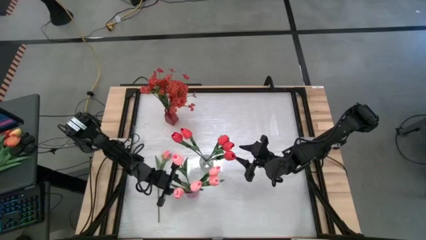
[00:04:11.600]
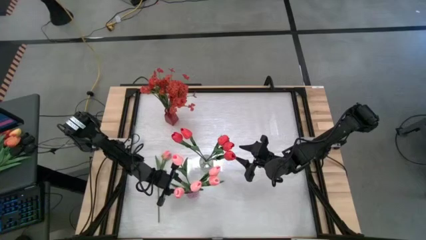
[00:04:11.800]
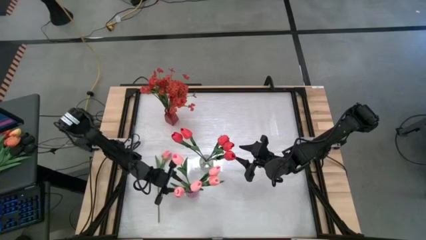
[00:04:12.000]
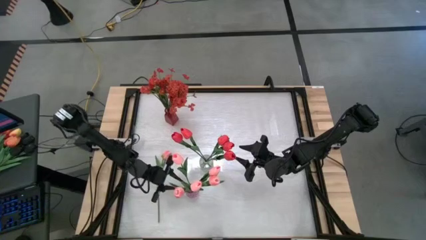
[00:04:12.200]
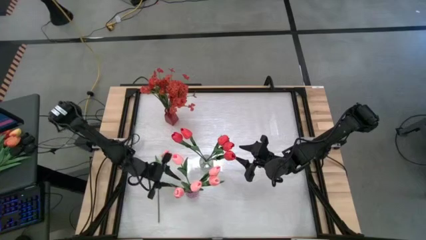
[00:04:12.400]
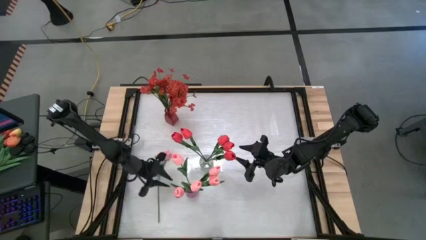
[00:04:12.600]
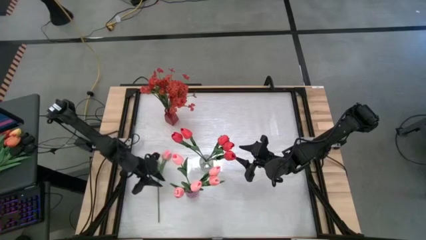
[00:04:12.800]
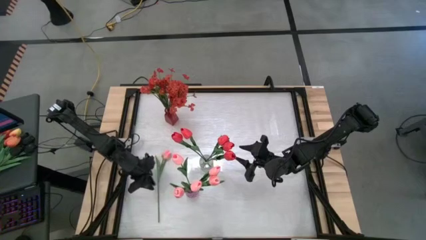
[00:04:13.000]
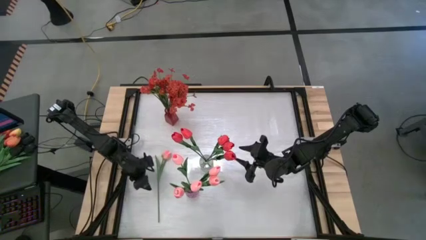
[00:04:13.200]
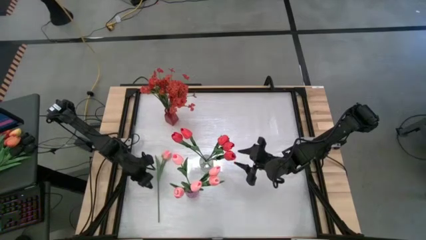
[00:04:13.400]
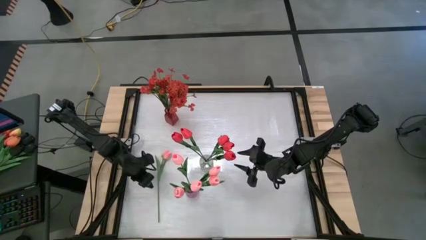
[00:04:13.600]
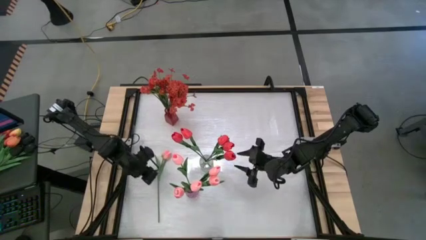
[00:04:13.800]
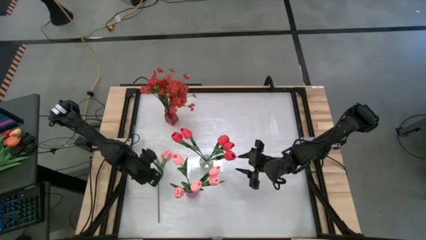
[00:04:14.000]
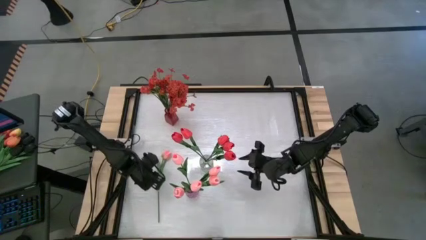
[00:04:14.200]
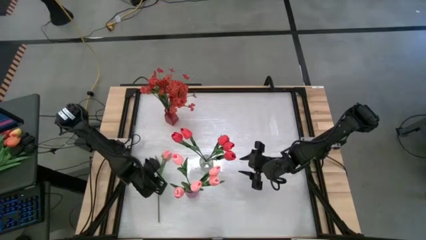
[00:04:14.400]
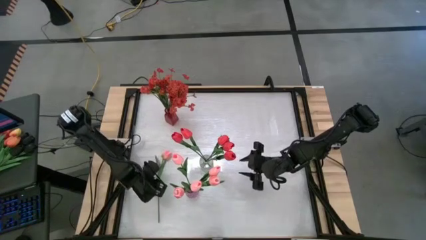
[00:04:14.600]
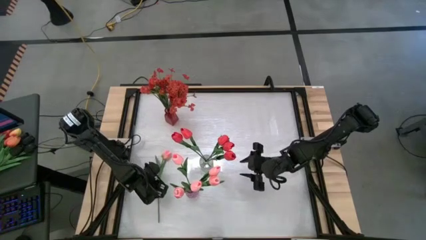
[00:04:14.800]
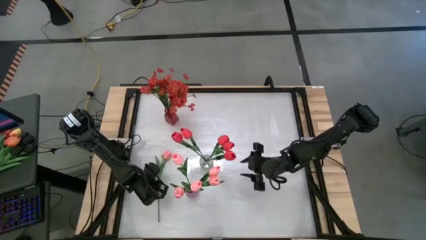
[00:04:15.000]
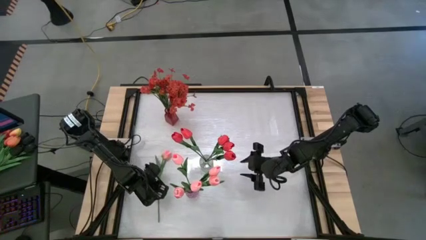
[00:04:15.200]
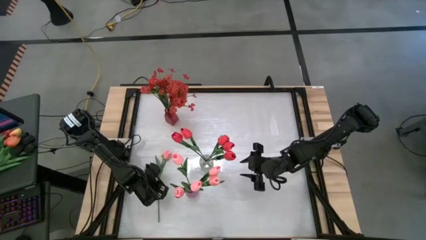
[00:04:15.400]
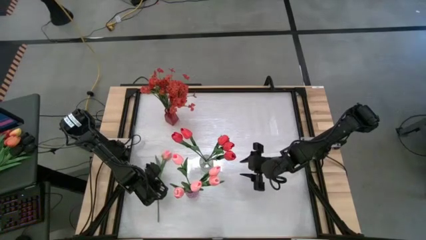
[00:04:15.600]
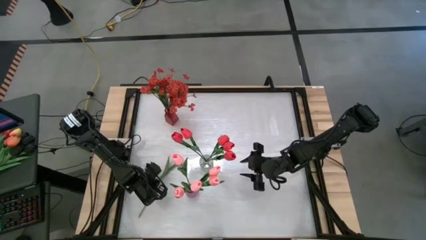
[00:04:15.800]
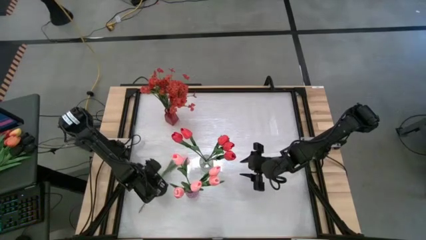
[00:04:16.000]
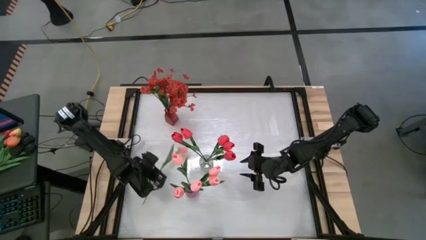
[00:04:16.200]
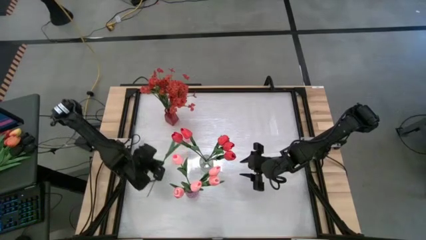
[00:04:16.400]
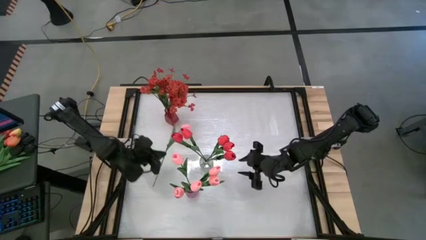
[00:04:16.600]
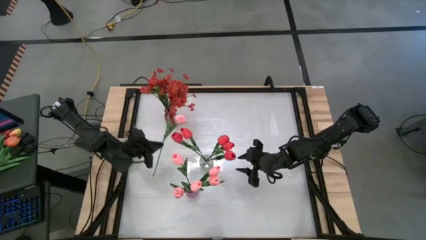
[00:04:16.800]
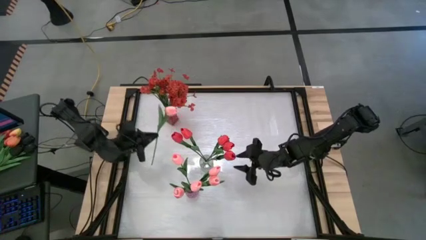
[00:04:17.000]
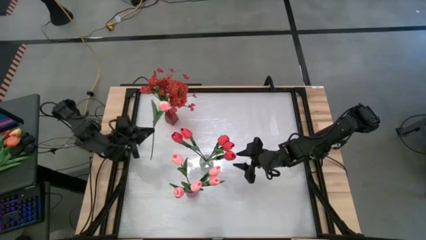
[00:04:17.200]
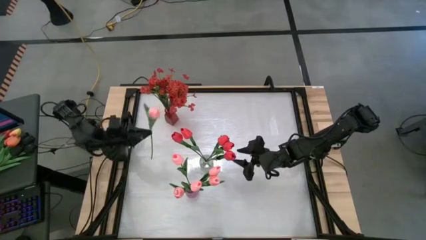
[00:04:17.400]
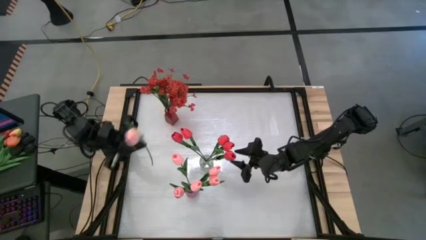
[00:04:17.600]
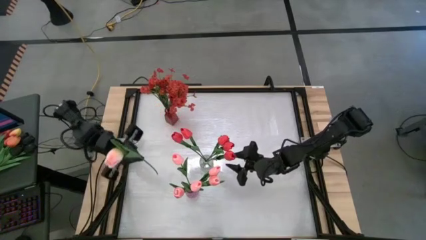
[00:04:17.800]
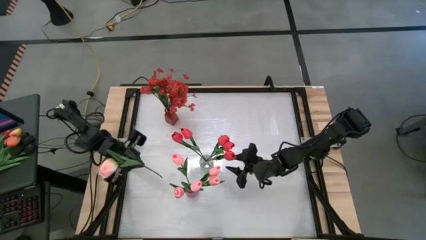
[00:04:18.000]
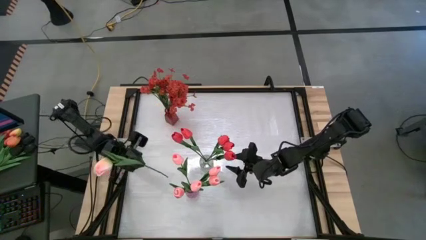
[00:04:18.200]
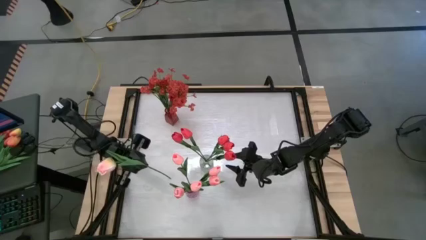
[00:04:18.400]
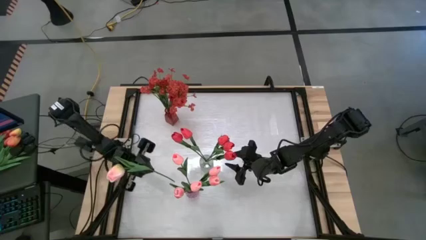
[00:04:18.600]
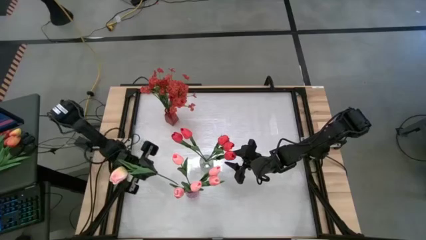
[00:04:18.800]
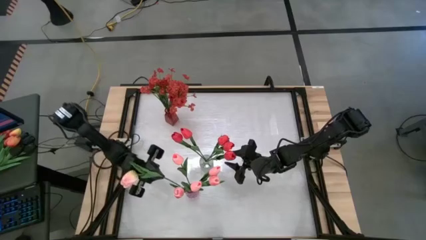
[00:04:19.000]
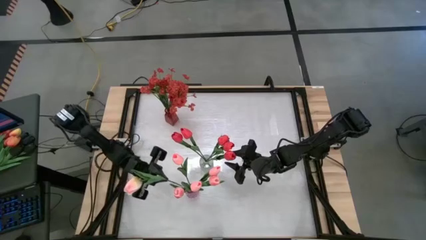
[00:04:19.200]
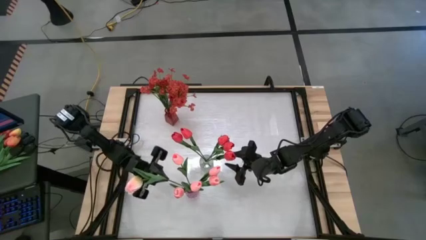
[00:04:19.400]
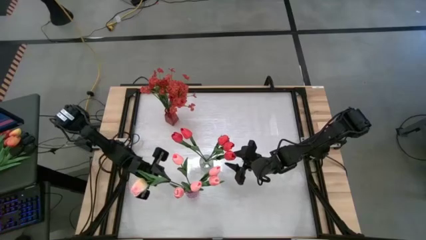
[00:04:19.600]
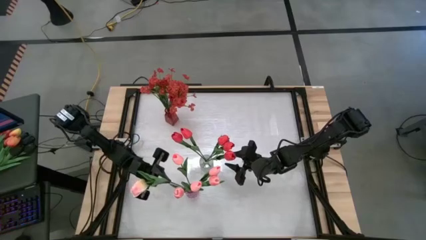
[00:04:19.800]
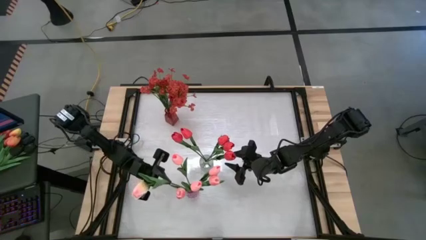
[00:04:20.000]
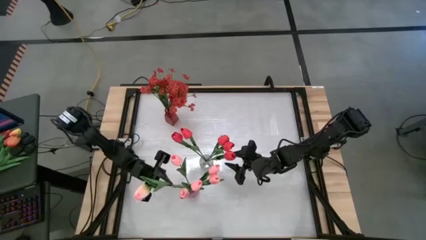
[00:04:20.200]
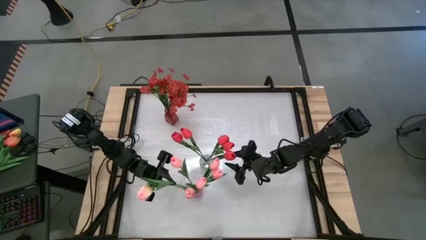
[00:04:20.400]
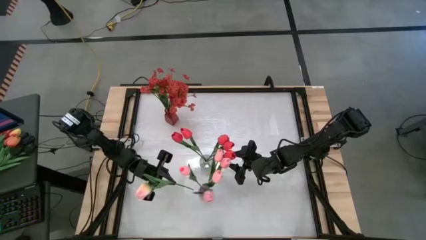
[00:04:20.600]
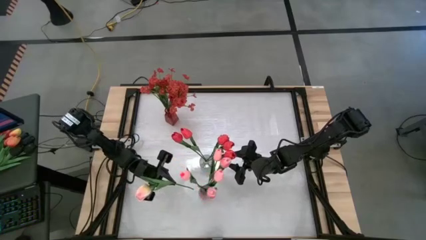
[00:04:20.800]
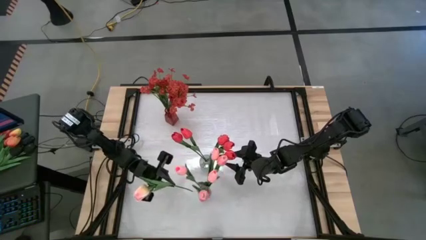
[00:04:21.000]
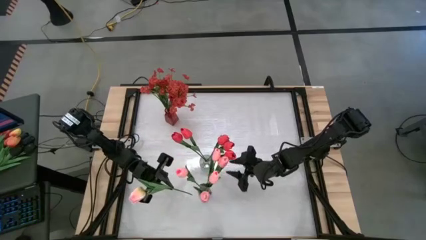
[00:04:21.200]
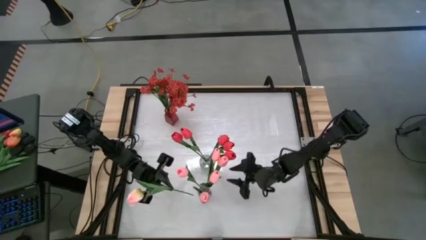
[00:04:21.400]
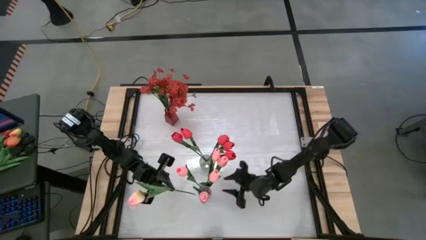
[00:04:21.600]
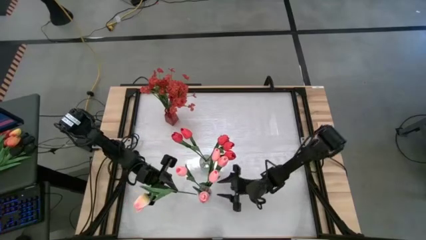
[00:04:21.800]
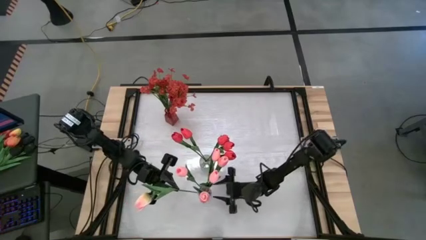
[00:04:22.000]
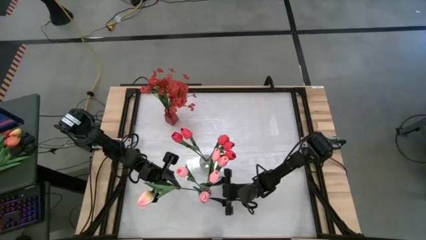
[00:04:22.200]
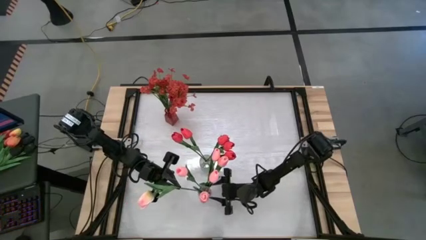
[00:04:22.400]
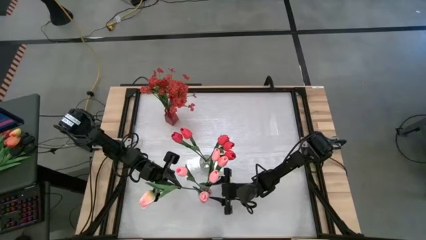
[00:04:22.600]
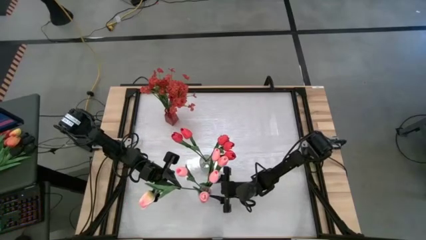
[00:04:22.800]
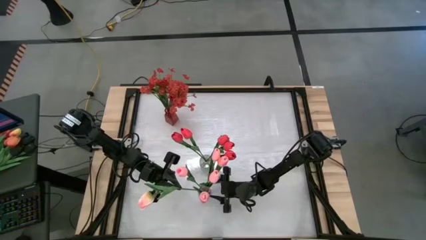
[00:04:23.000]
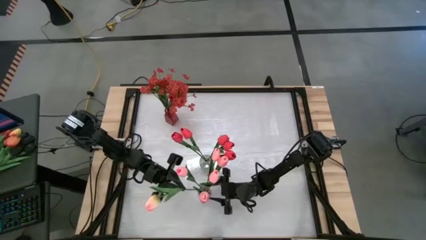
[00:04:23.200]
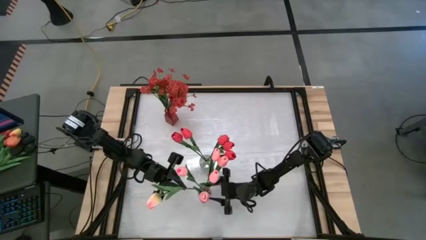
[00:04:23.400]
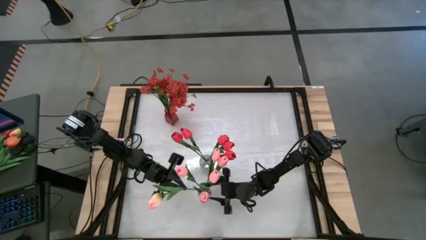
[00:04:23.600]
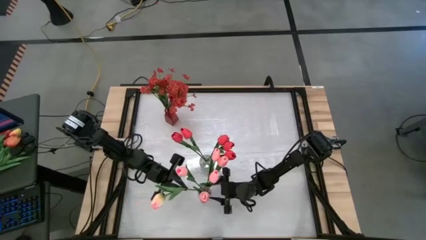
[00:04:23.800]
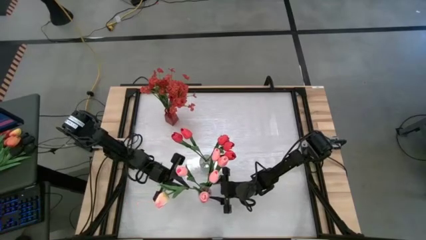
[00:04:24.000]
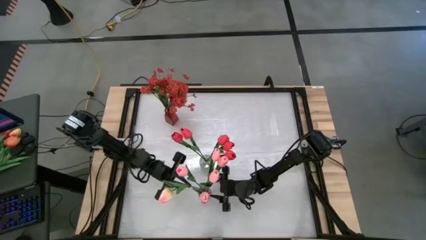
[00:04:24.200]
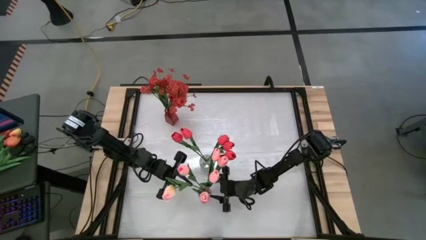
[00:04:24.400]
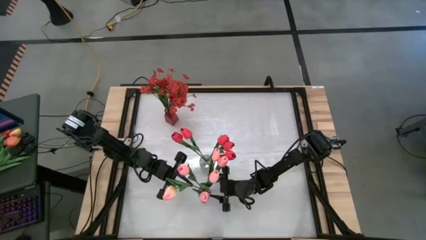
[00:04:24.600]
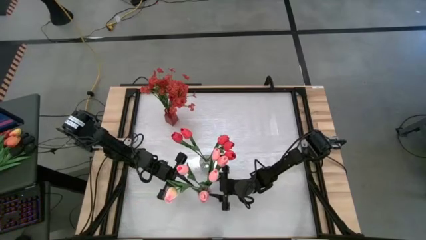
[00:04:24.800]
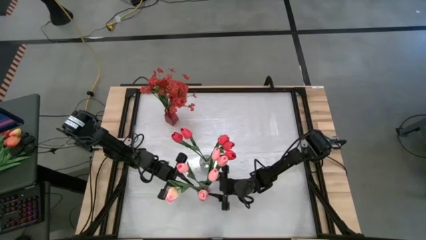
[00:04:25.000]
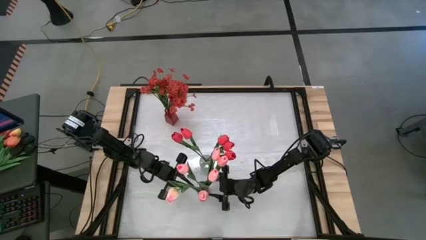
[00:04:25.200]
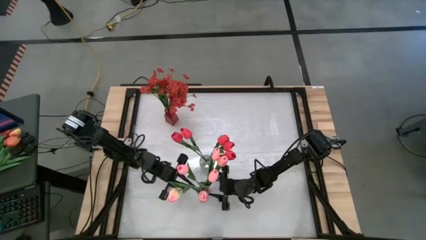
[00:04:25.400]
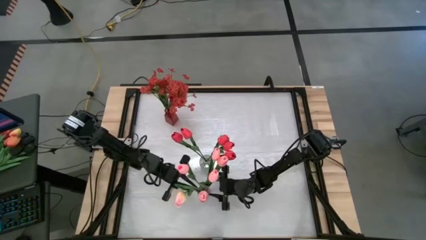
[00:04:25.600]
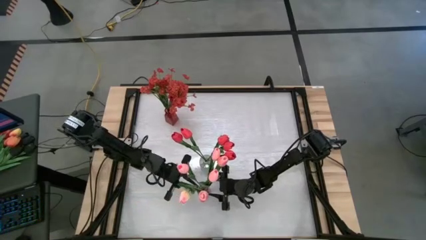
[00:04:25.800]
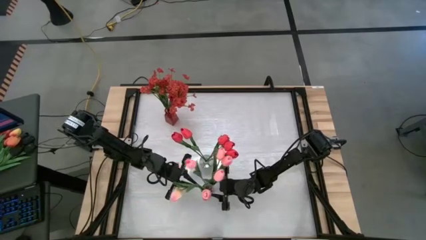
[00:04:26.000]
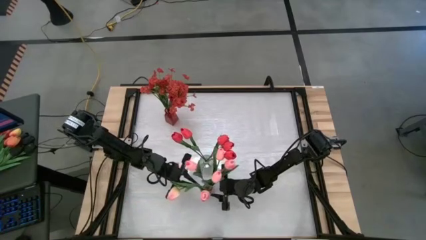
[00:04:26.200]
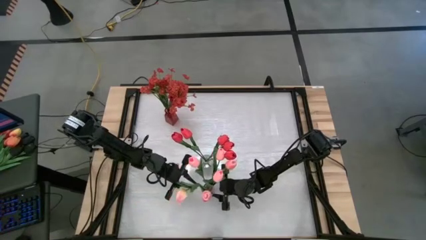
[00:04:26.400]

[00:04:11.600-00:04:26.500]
Task: Sort flowers into vase by color
Put the pink flower into the purple vase
